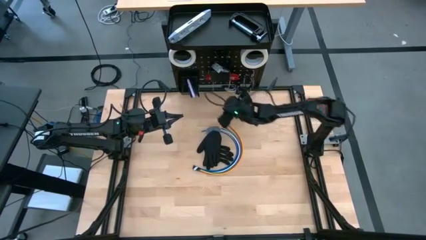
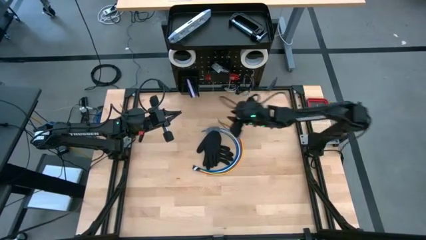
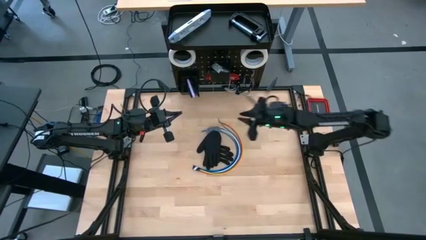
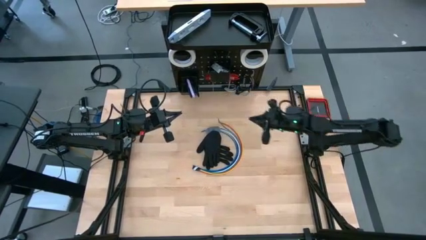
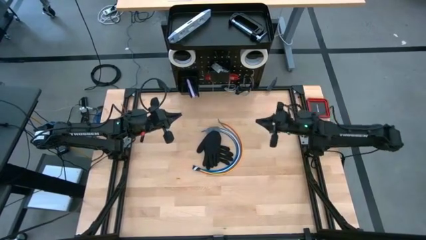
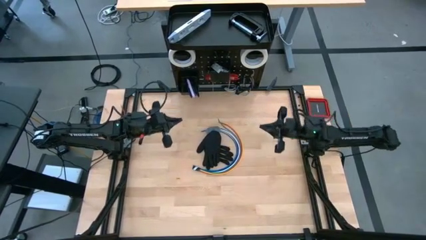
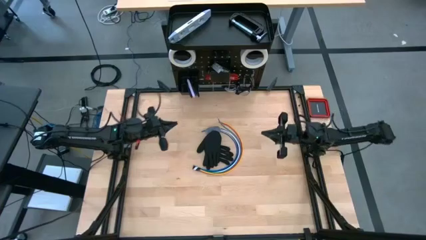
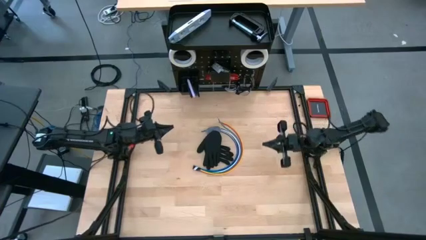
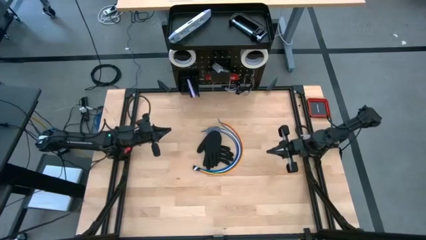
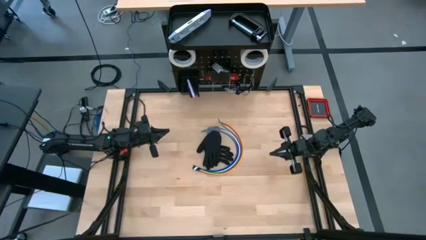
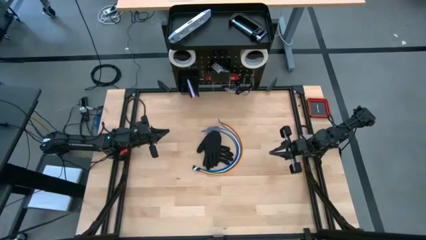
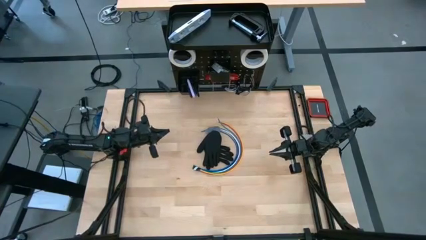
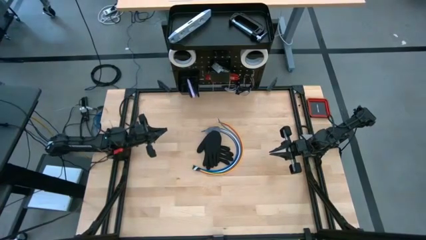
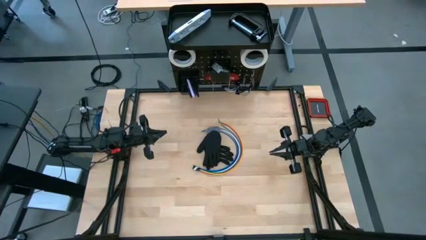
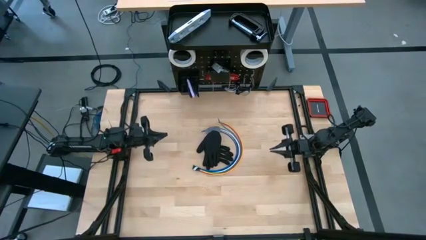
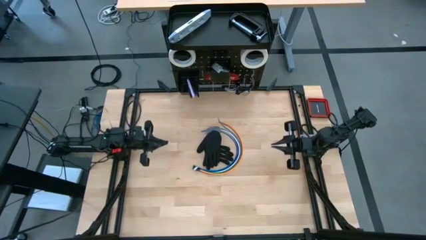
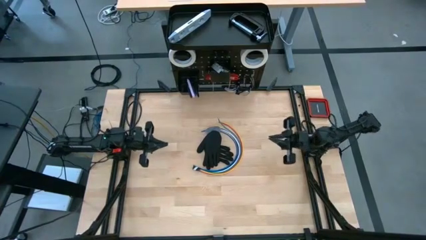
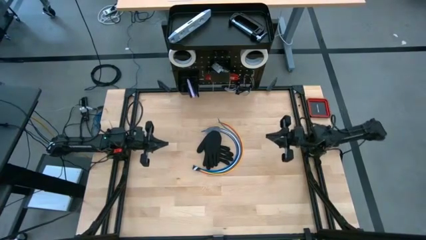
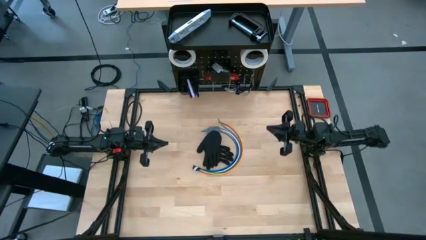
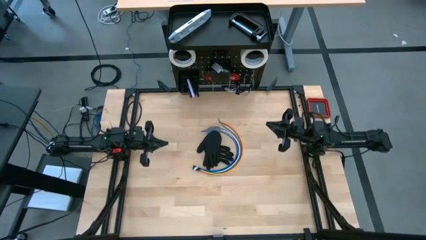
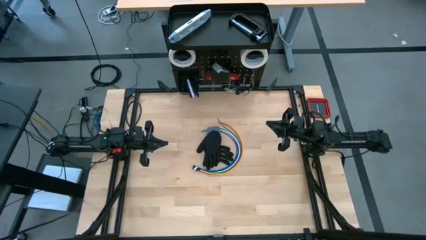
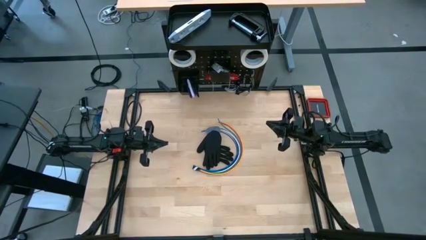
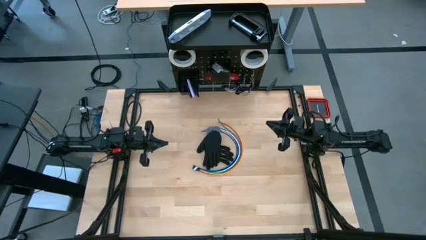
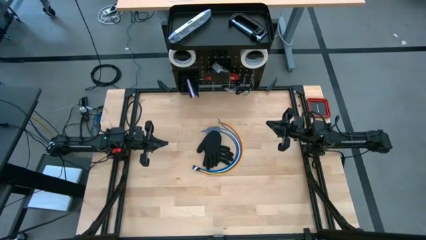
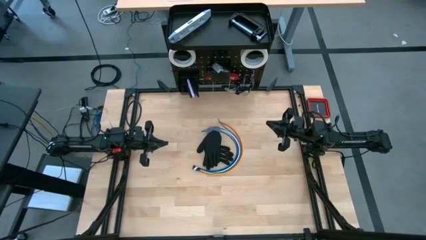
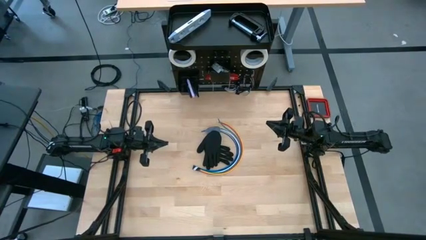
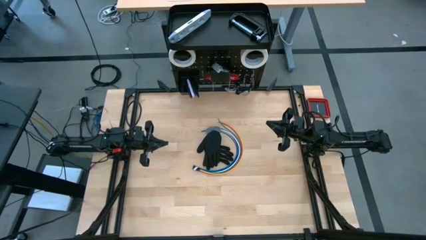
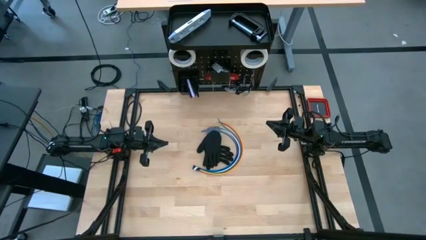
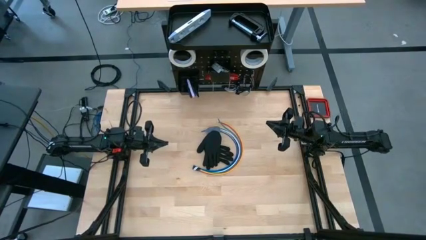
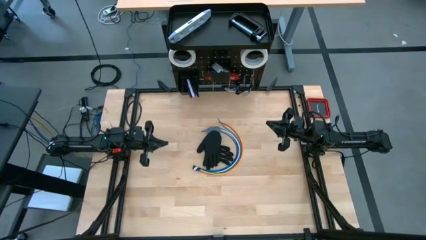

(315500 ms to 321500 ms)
Task: Hang tools onto peg board
Return to Home Position

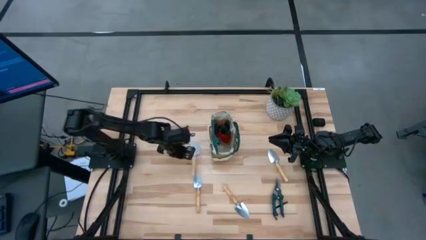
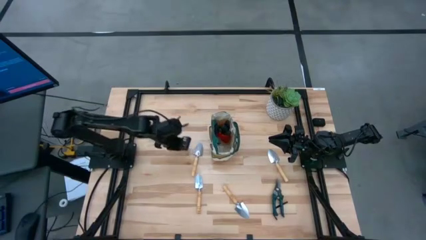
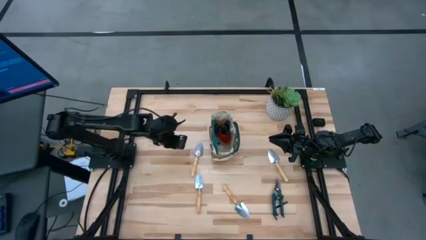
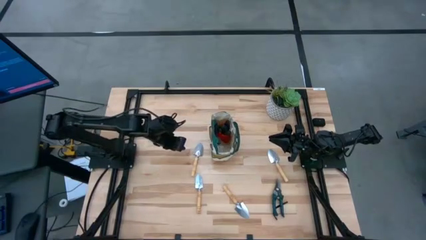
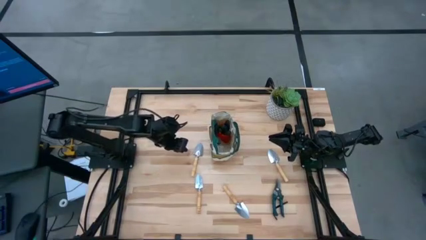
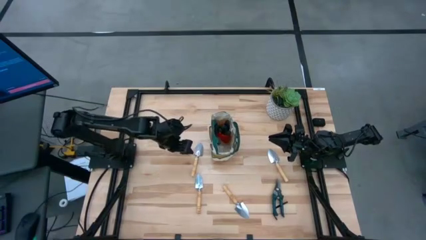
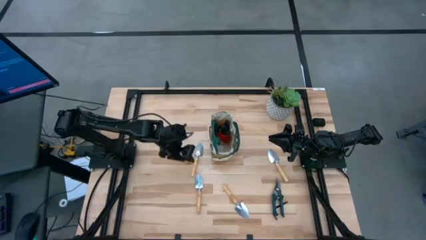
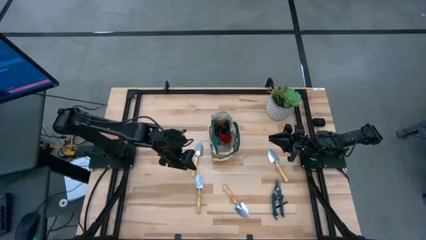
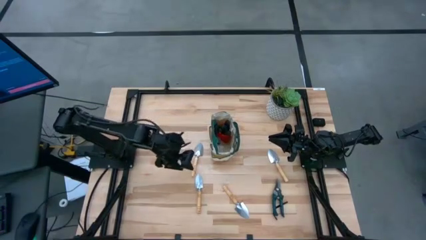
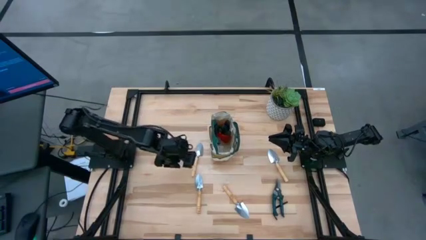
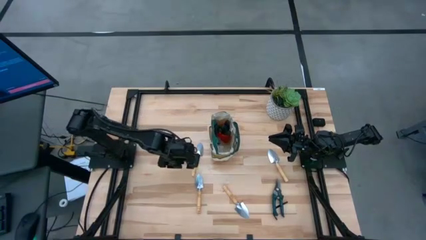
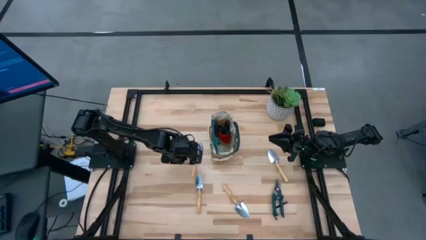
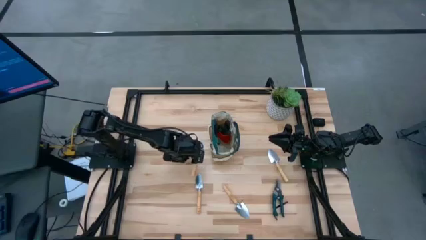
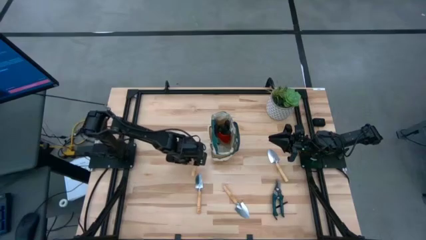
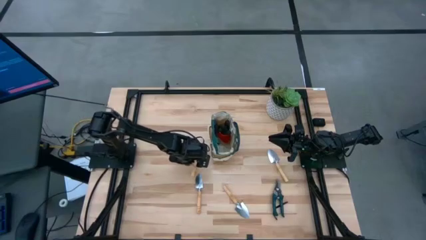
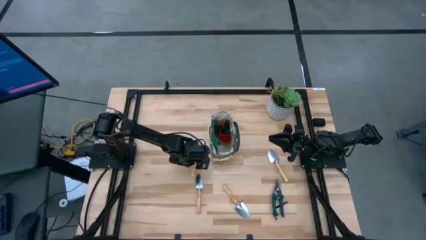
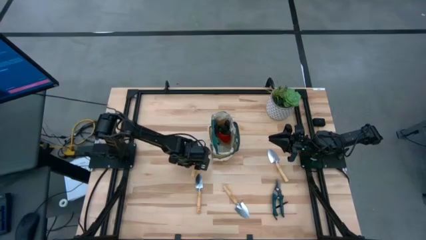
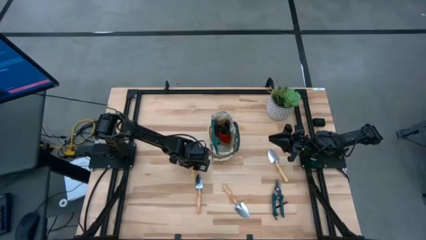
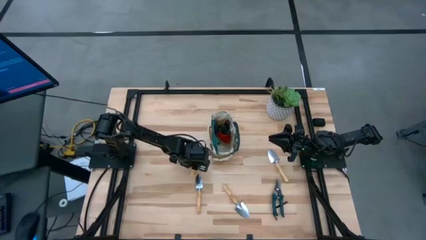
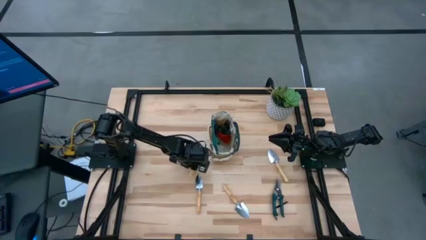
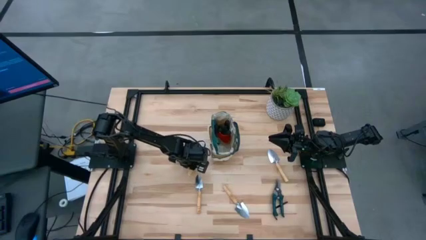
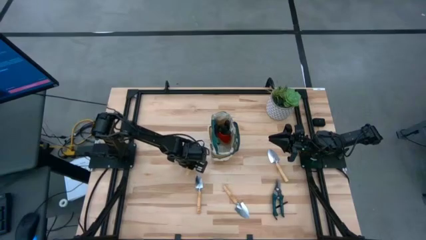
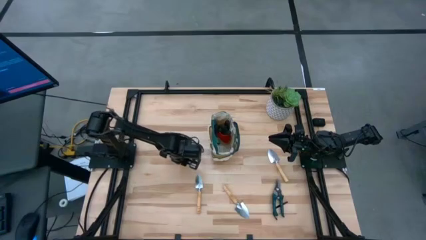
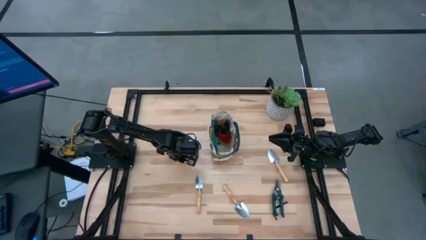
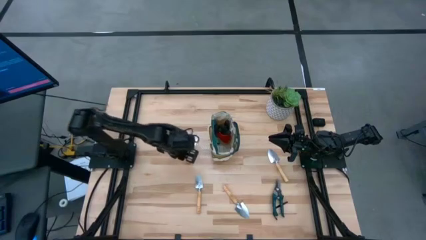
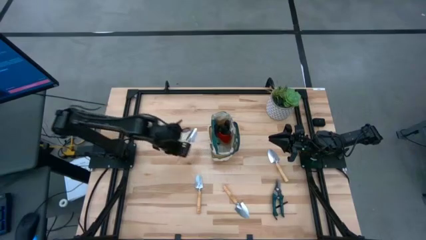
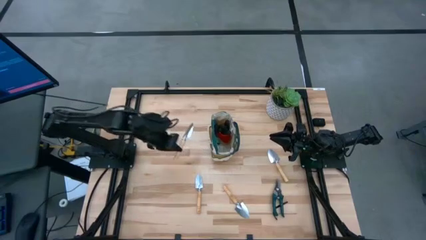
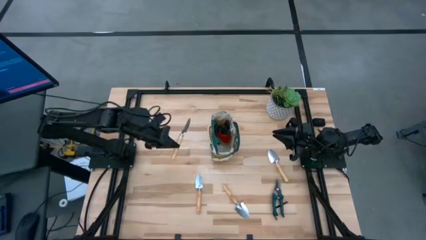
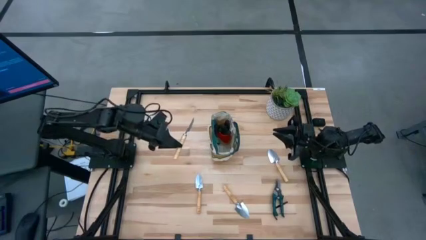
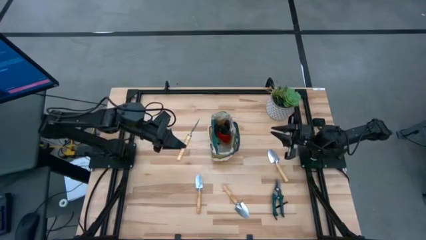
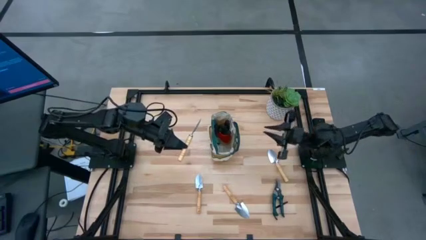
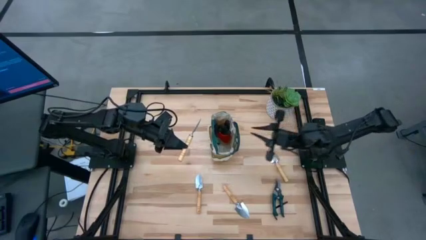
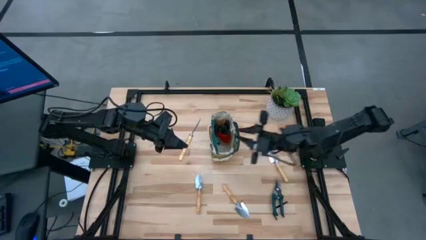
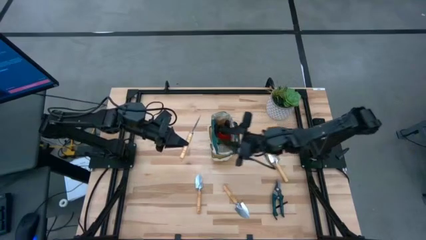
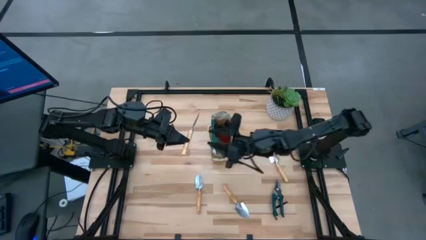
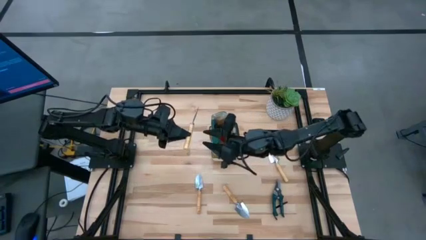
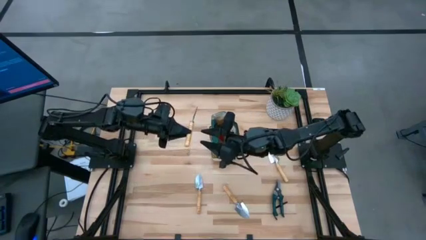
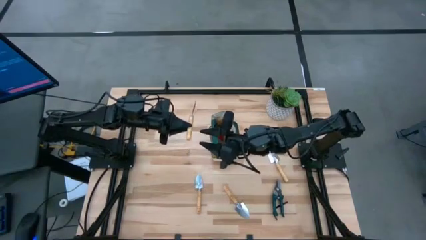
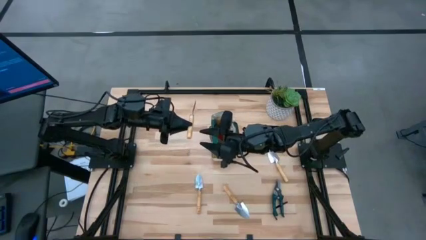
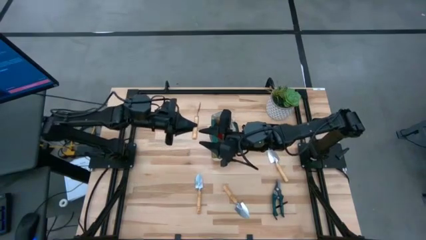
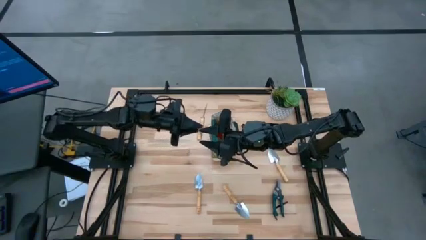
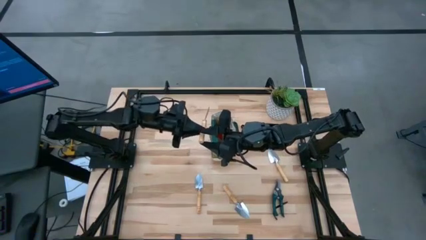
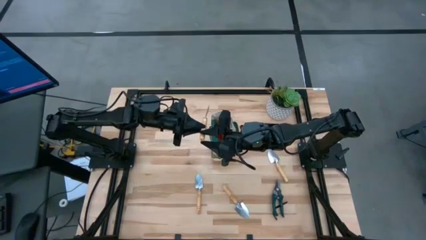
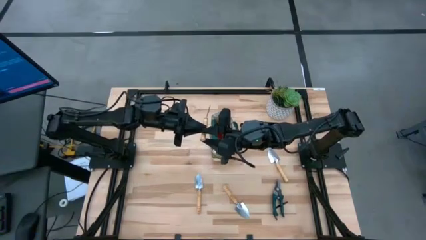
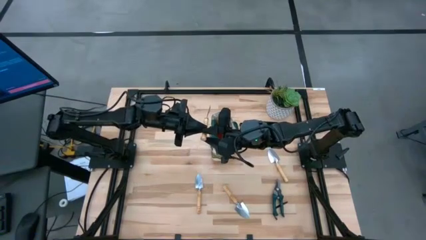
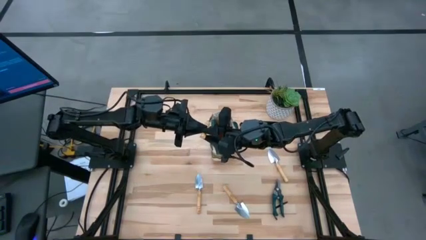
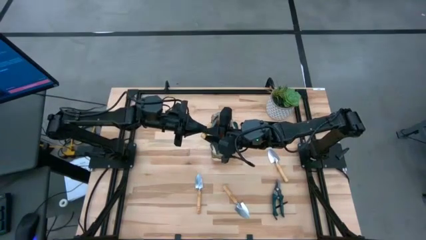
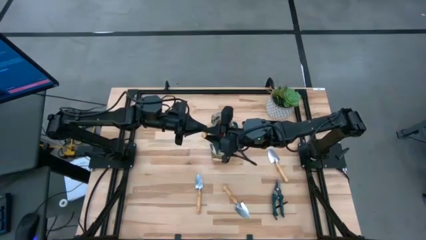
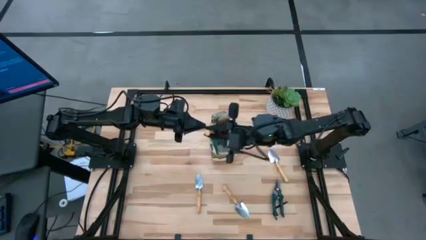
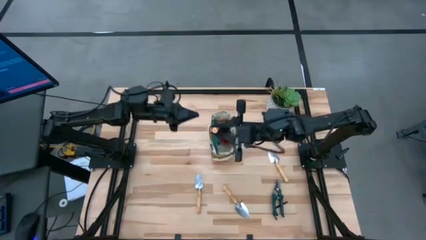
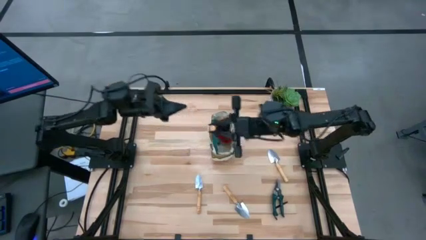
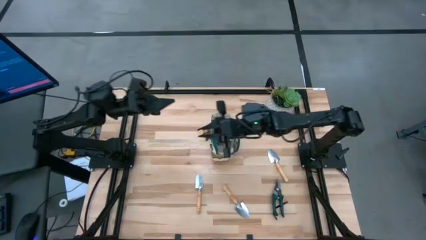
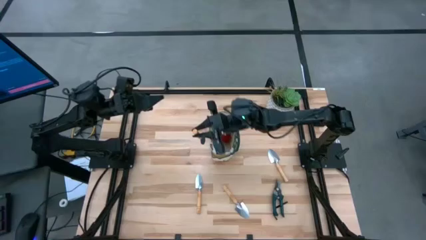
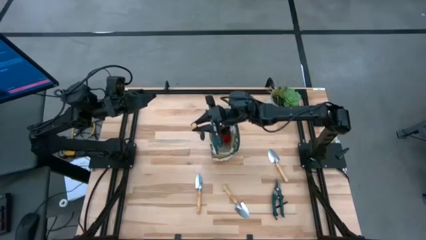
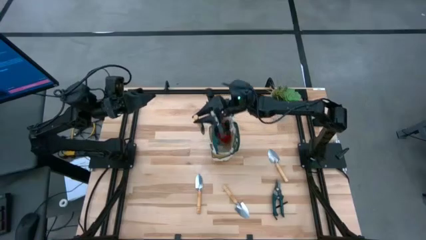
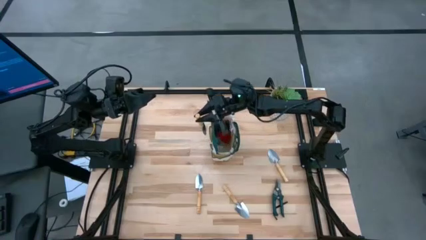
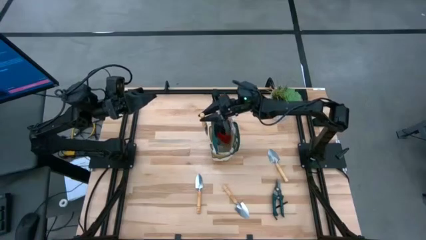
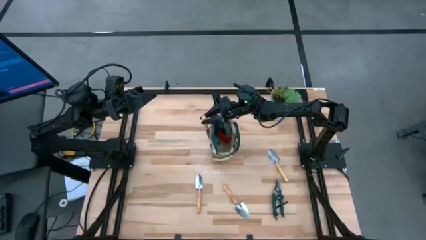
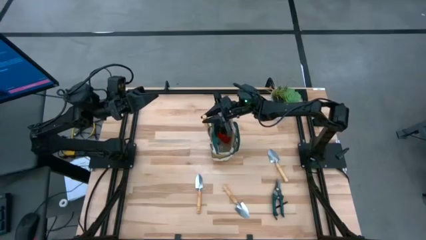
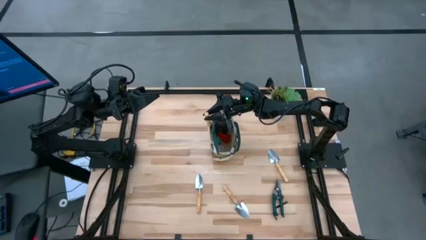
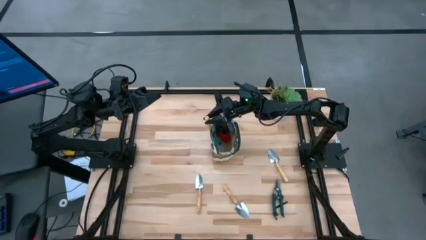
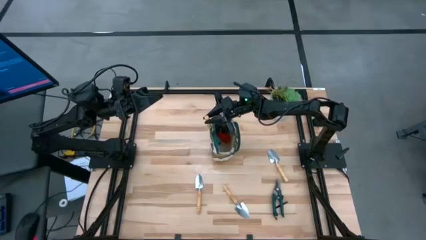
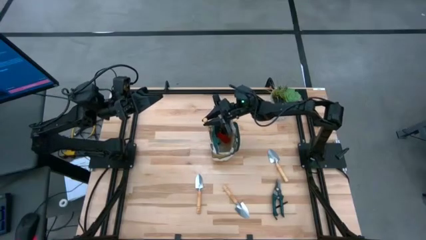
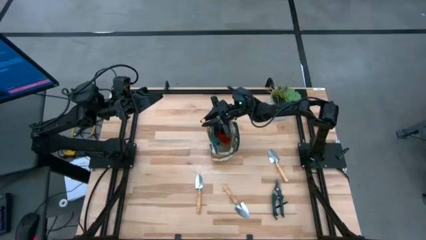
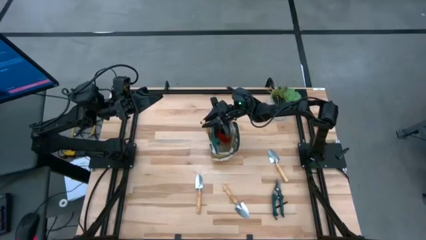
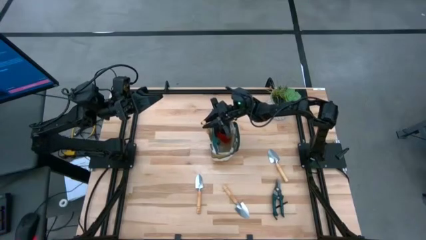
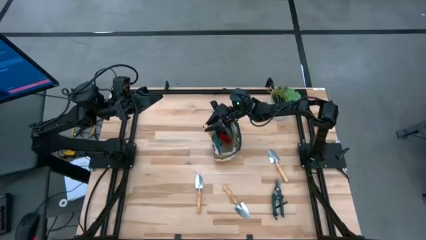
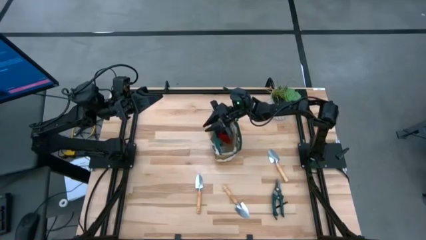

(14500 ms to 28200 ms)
Task: Pick & Place Garden tools in Gardening bag
Put the brown trowel into the gardening bag
